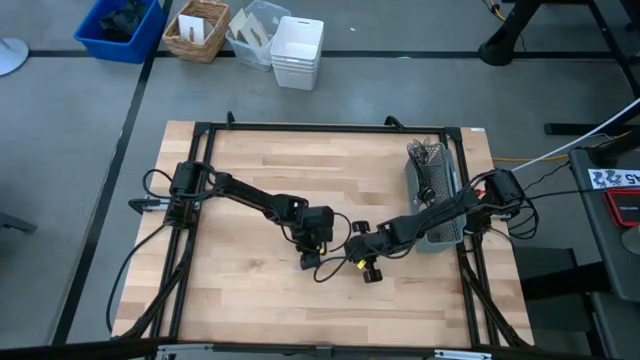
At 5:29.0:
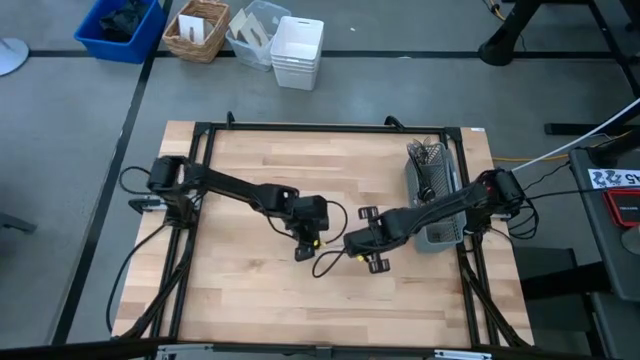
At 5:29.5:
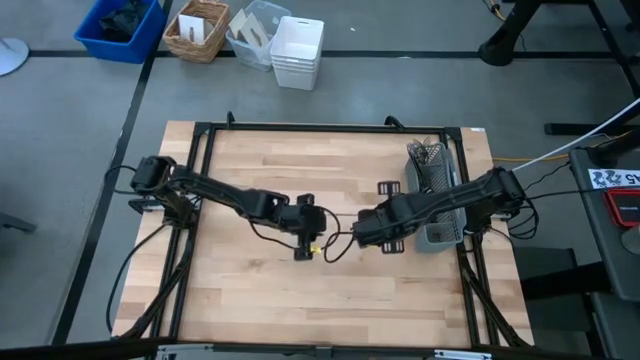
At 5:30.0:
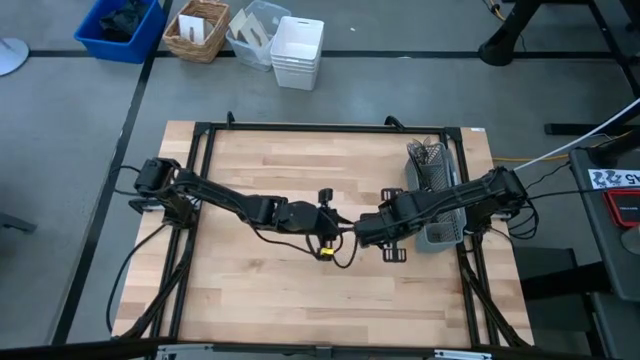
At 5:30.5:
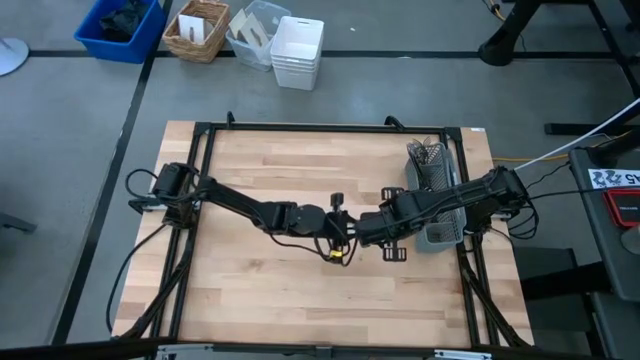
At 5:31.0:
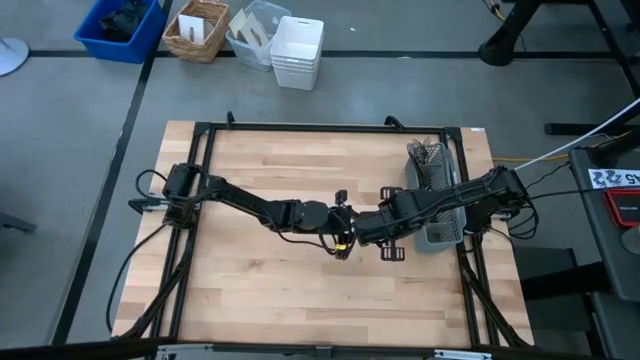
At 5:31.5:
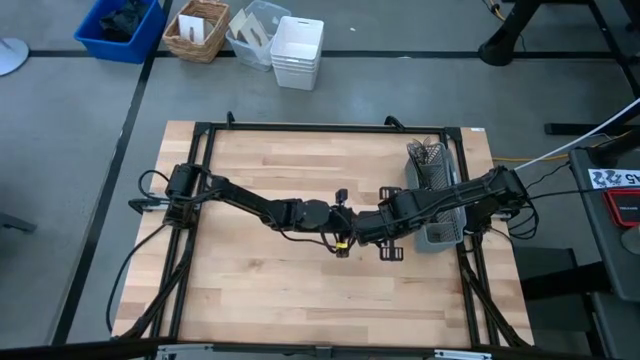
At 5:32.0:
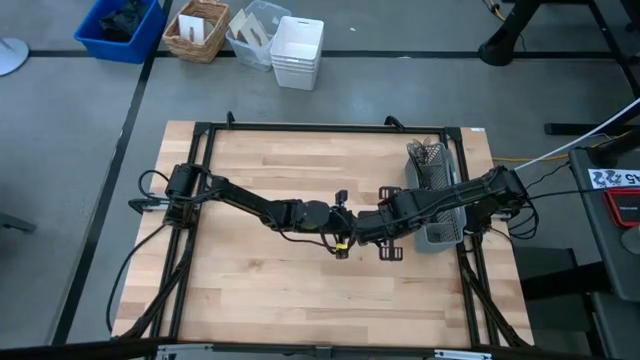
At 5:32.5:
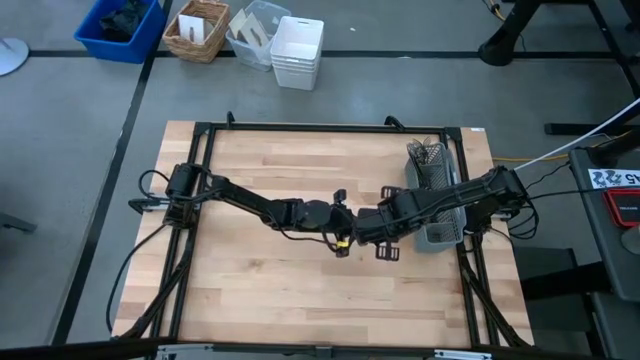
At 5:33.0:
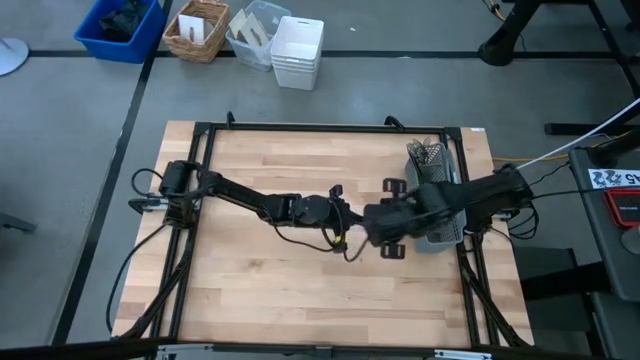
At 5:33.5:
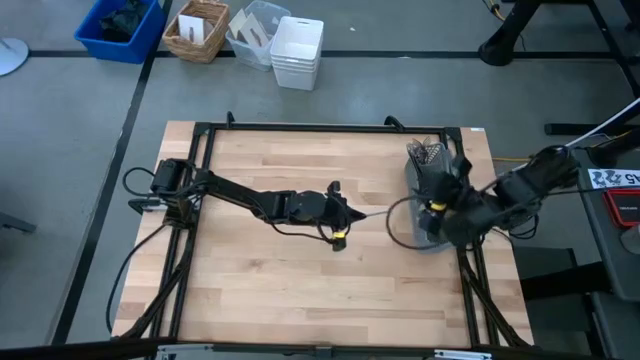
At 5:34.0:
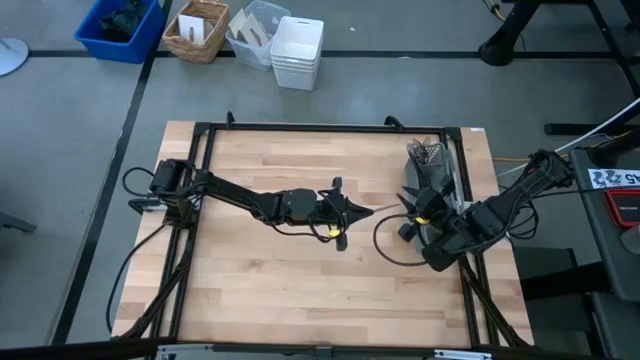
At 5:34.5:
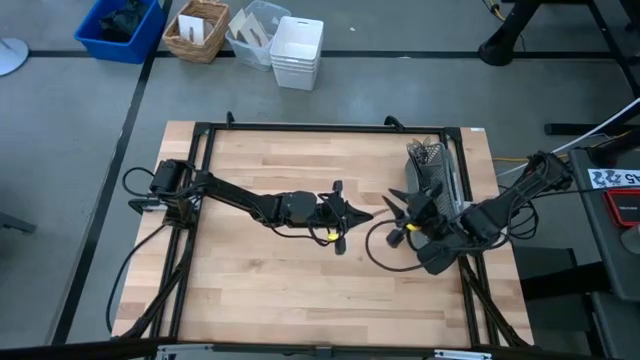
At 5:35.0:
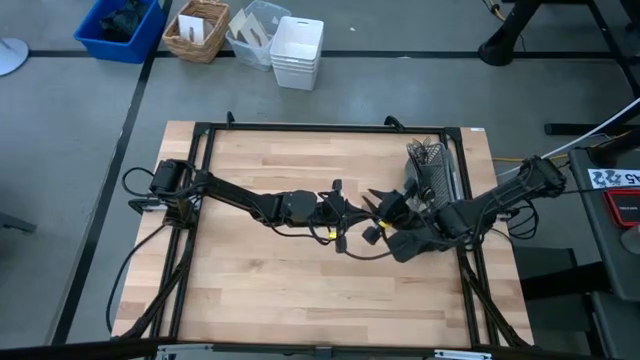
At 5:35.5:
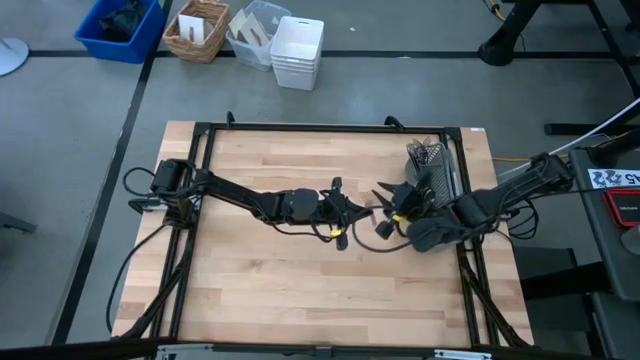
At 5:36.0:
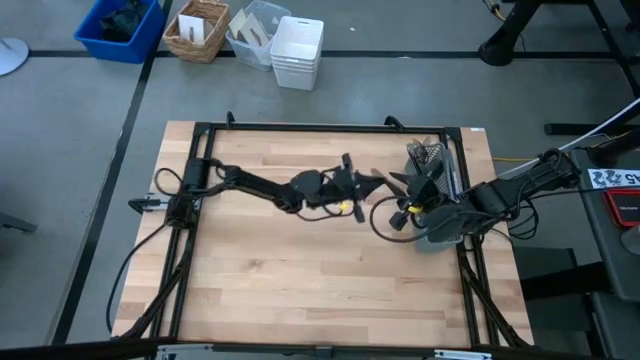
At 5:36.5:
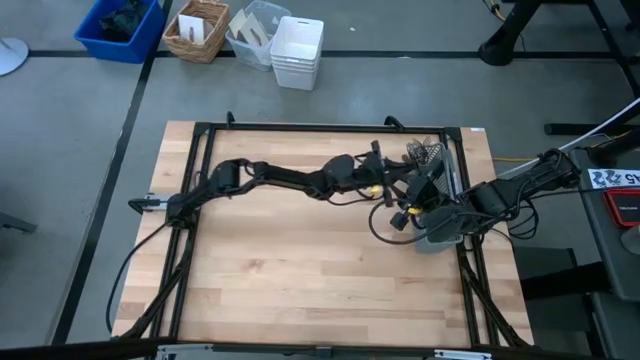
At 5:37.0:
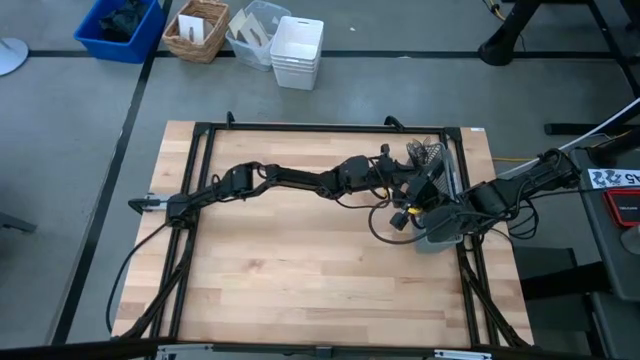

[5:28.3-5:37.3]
Task: Sort silverware
Put the knife into the middle section of the utensil holder

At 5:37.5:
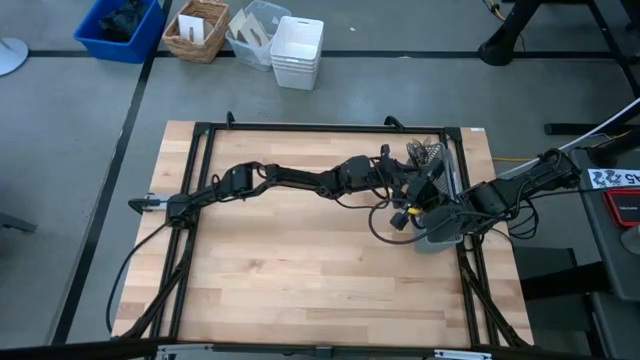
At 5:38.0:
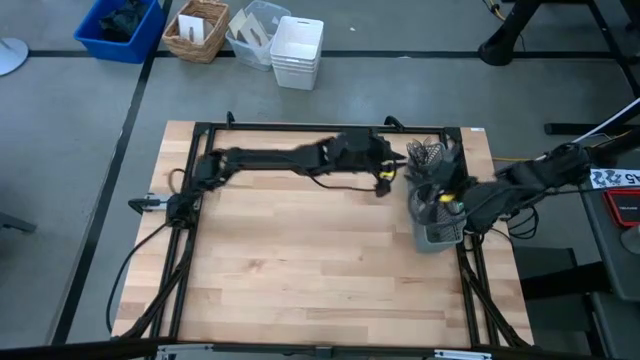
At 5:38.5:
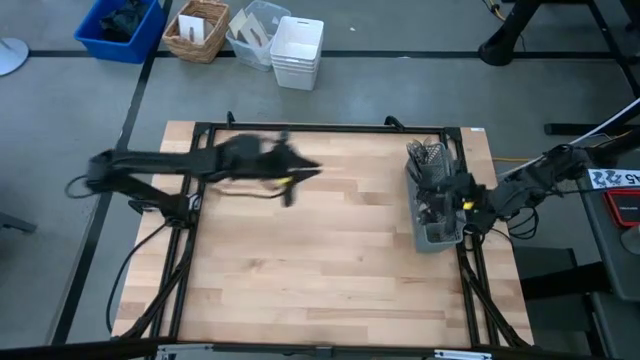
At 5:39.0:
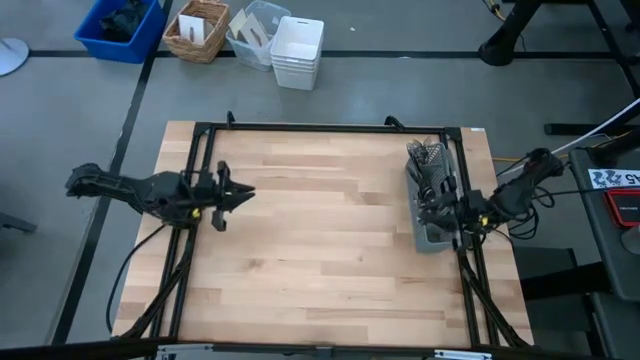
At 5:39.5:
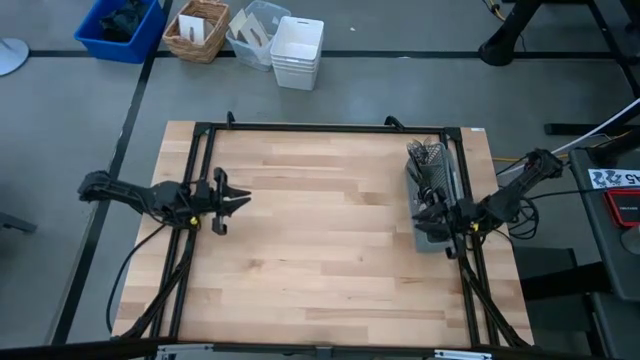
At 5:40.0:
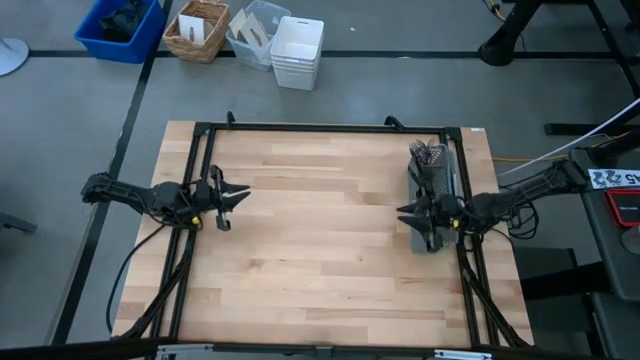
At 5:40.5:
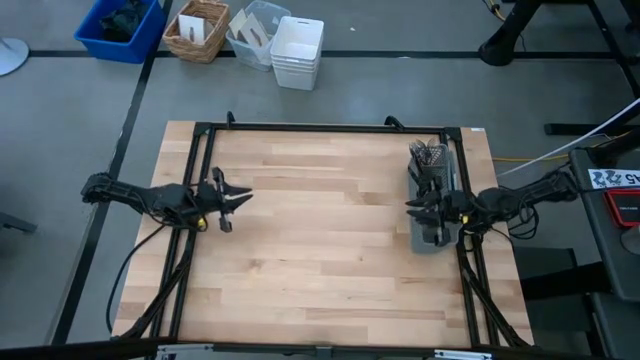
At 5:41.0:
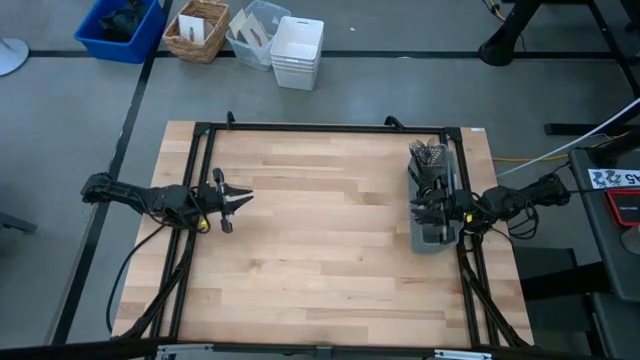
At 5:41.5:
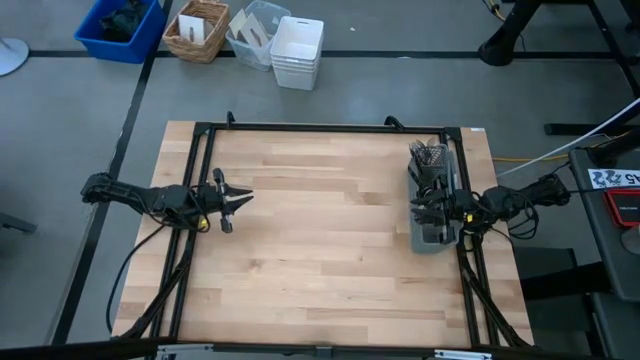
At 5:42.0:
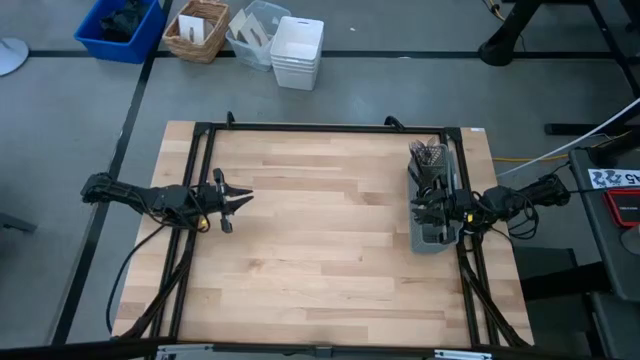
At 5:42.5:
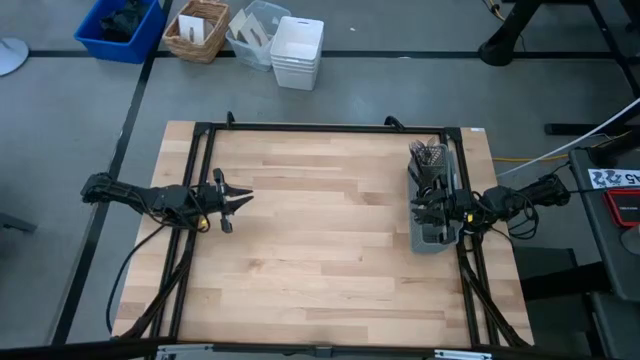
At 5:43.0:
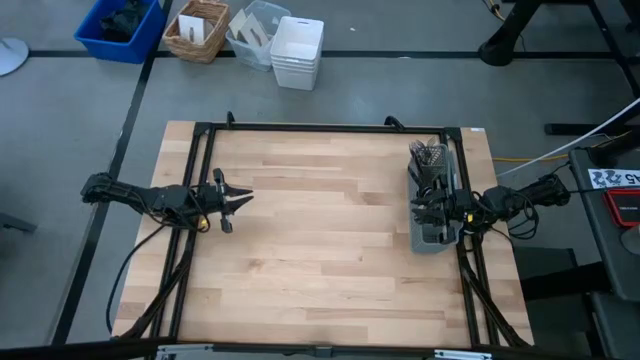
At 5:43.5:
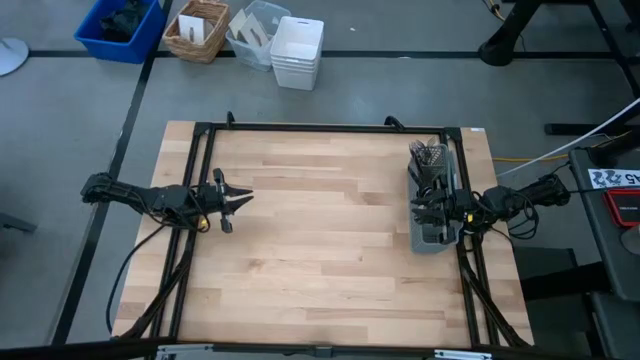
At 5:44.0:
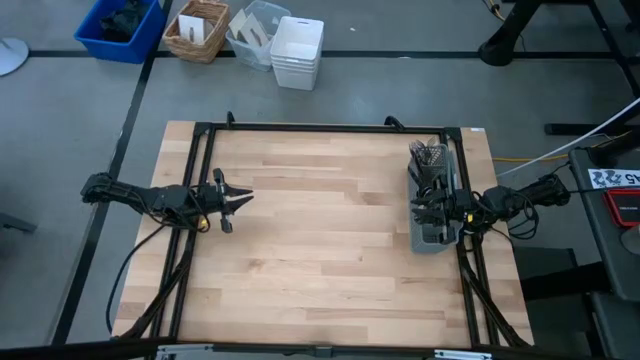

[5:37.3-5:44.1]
Return to Home Position

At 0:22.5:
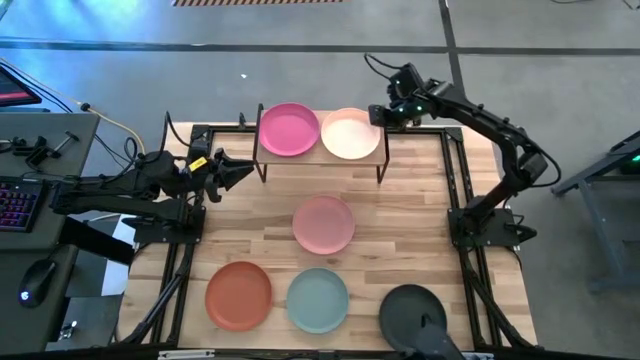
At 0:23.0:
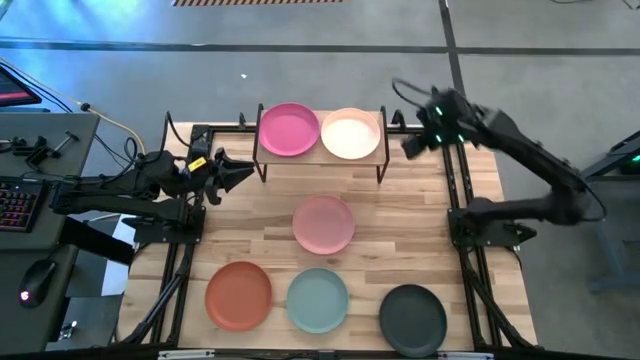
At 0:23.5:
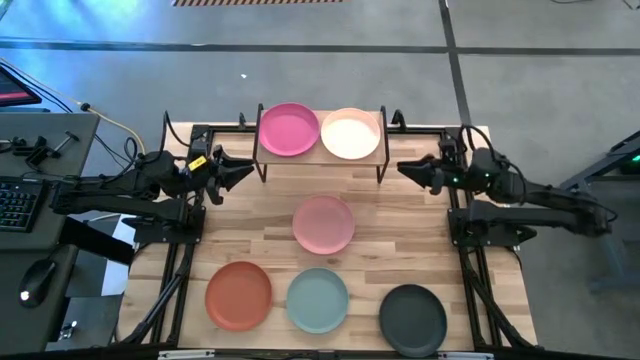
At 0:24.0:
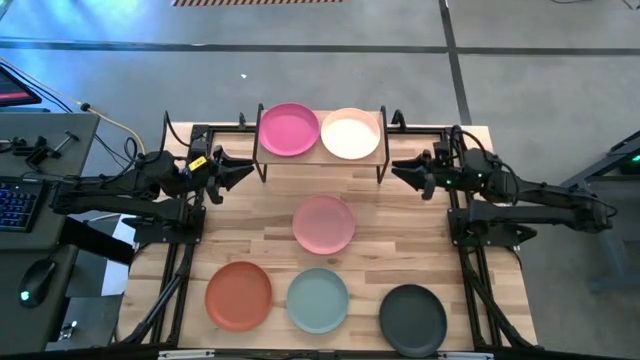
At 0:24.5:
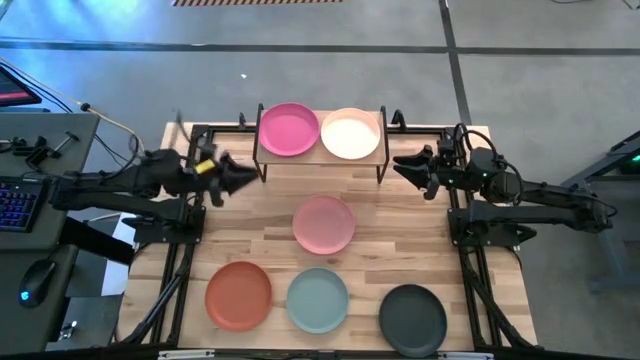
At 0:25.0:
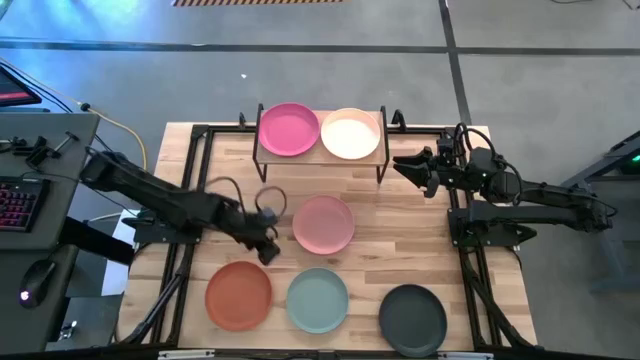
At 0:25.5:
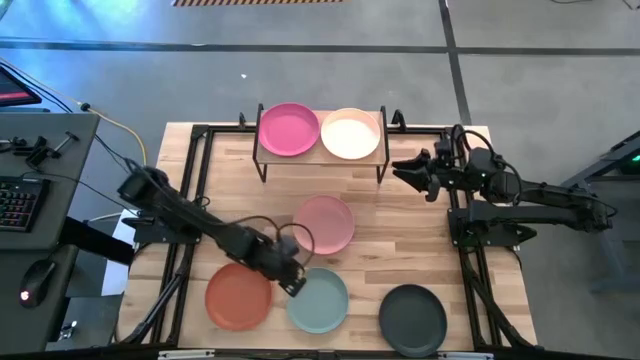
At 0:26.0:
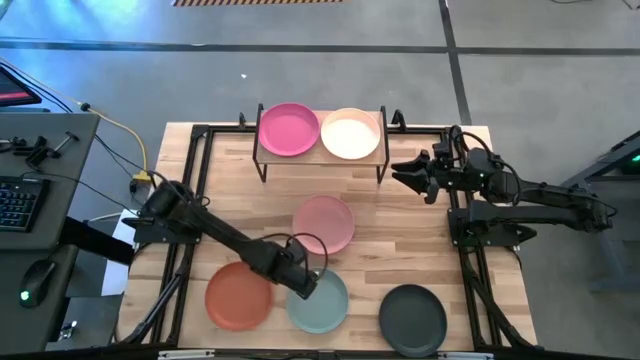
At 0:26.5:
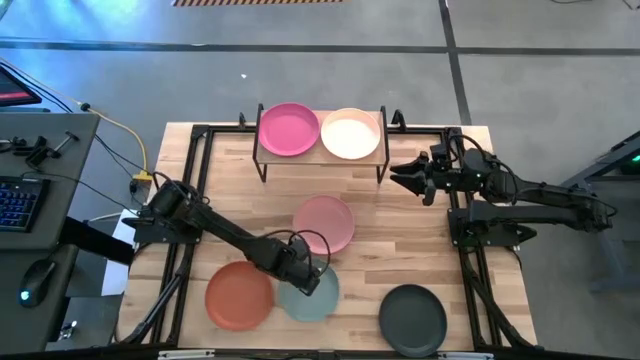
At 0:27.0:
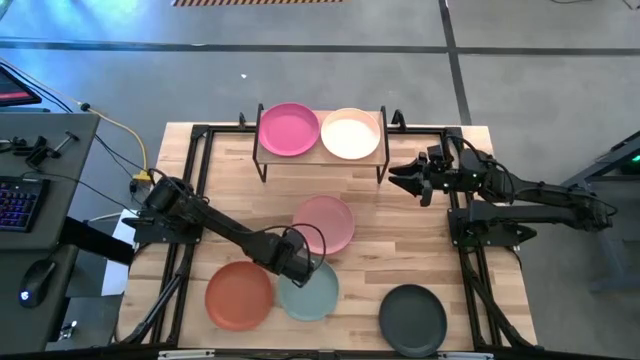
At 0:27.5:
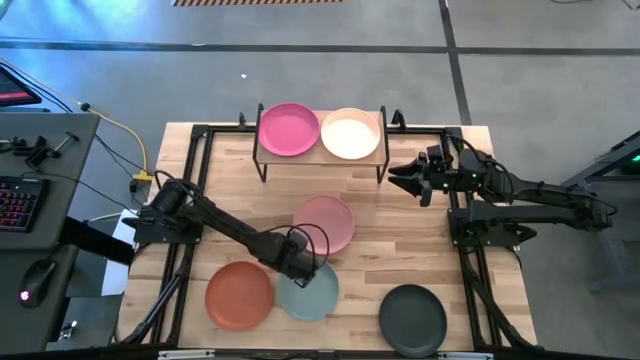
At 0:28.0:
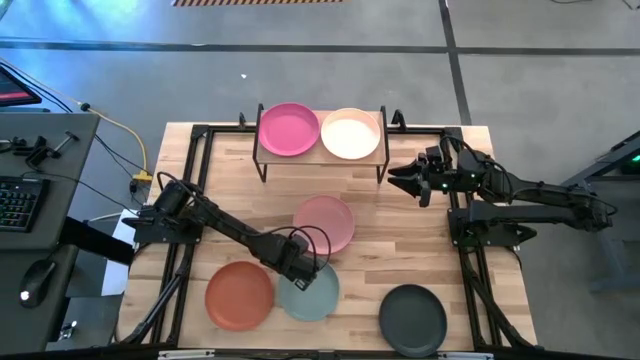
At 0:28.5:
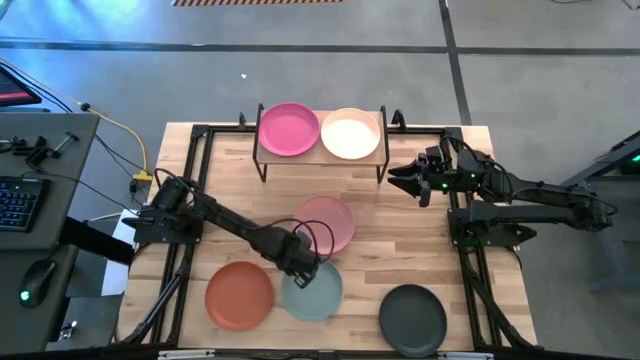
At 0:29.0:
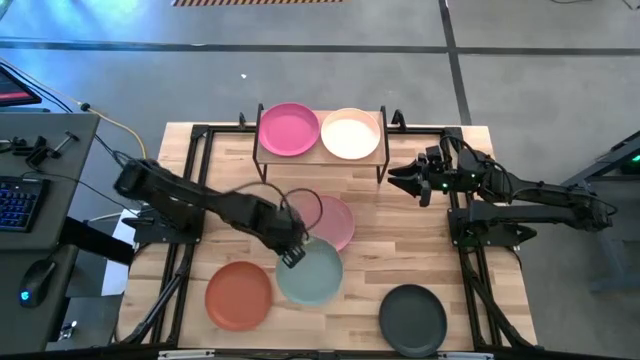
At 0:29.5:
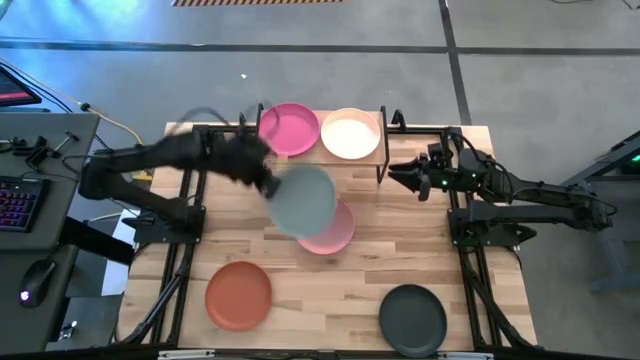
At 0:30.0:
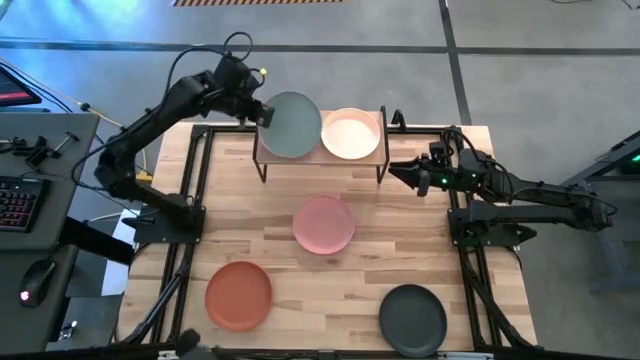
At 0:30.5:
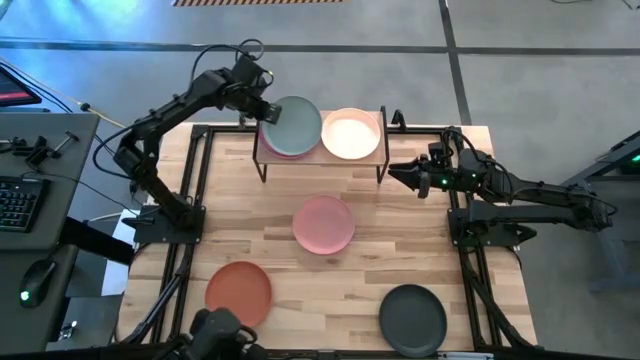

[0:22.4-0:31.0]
Task: Place and stack plates onto a shelf
Stack the blue plate on the pink plate on the shelf
